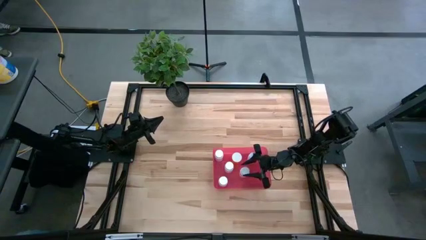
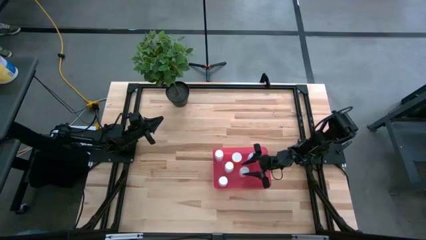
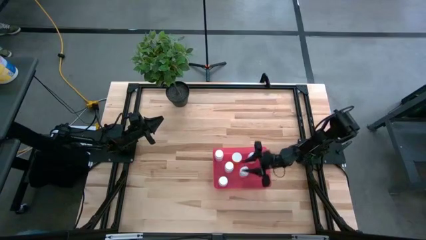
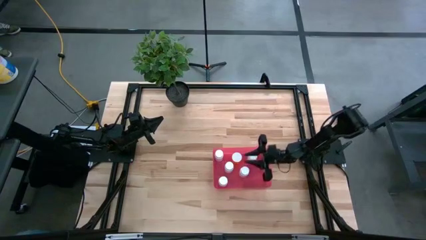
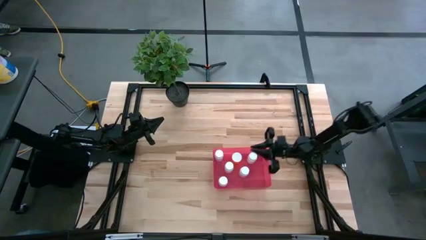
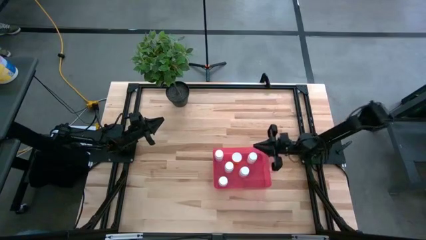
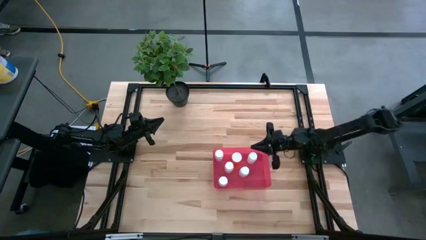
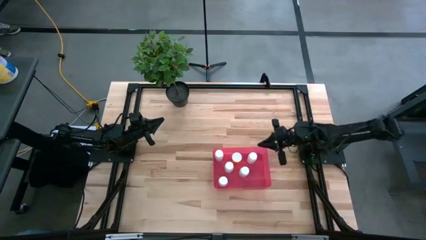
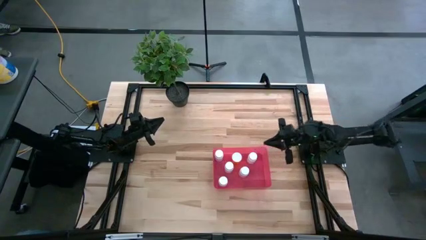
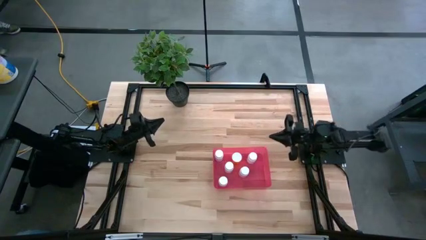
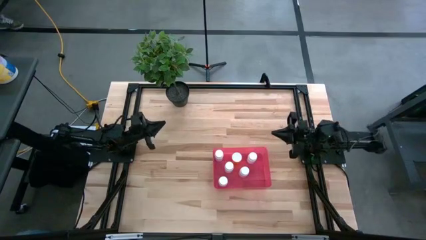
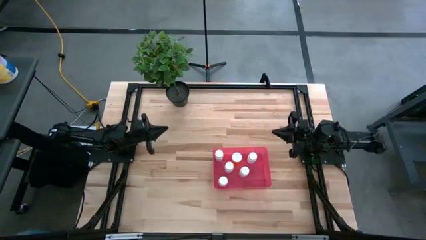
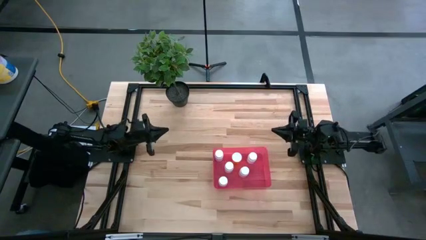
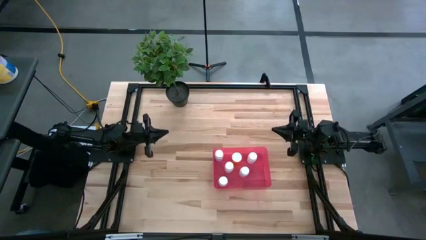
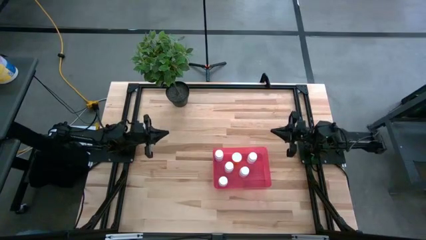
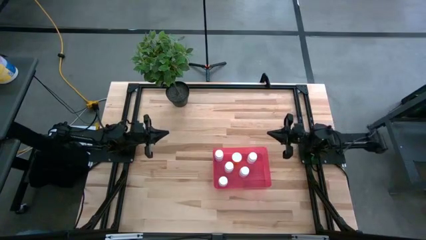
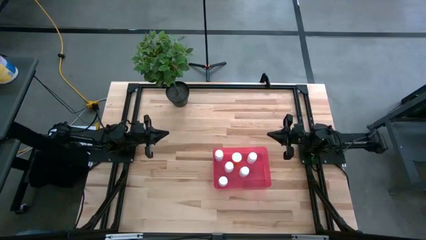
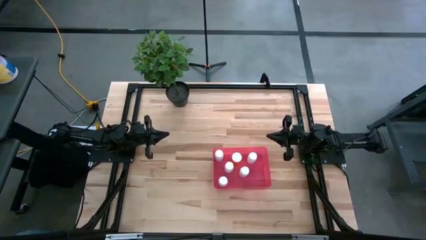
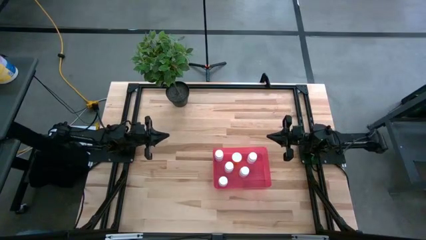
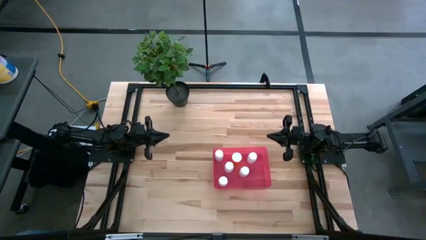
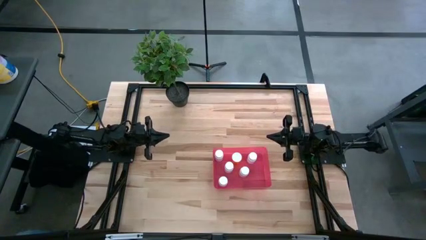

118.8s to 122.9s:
Task: Pick and place pill bottles into a basket
Return to Home Position

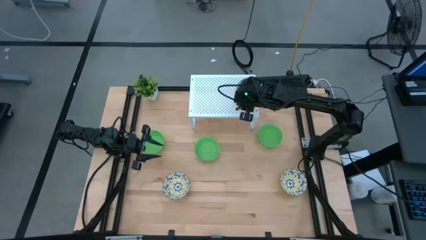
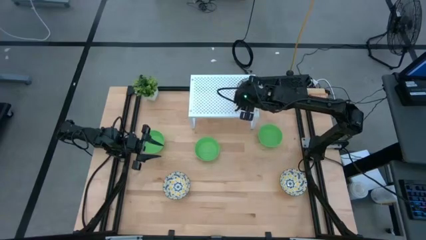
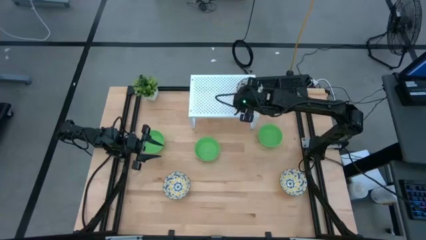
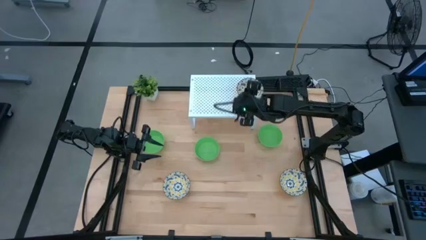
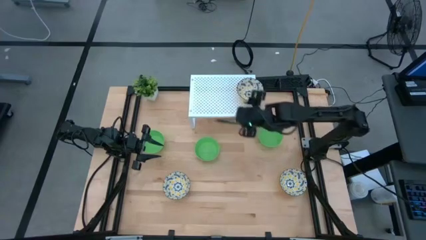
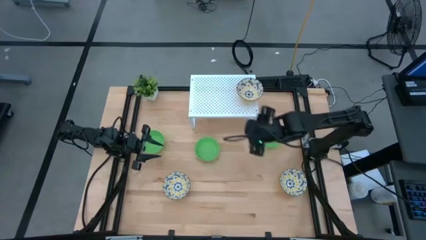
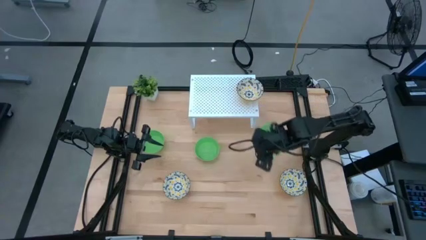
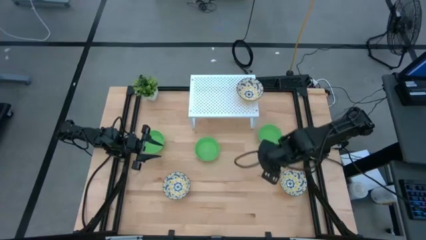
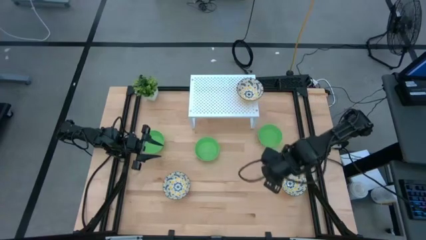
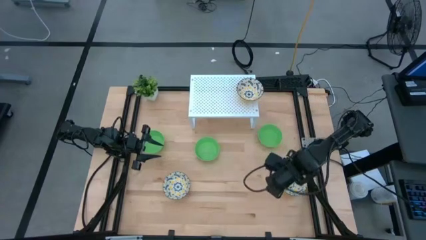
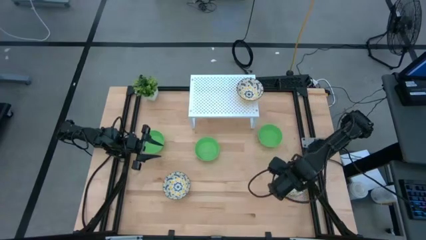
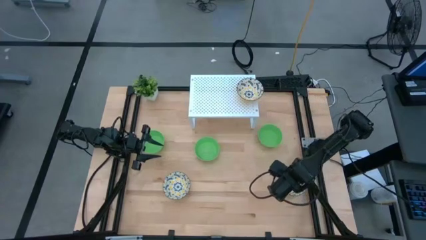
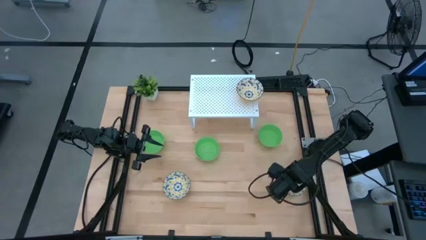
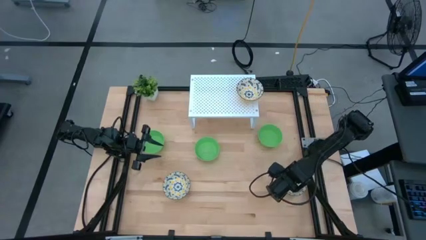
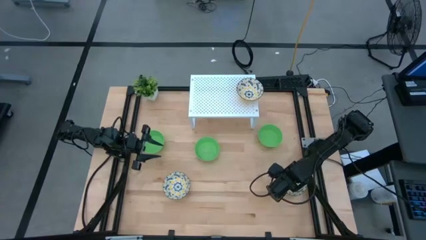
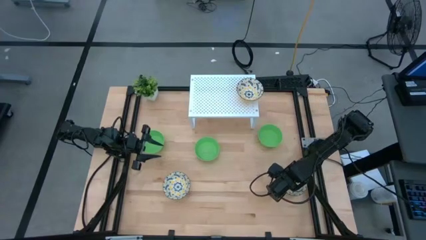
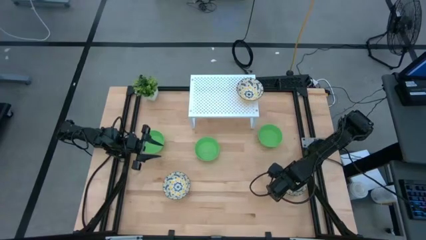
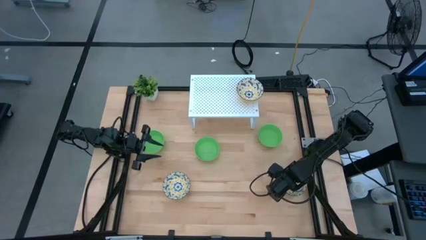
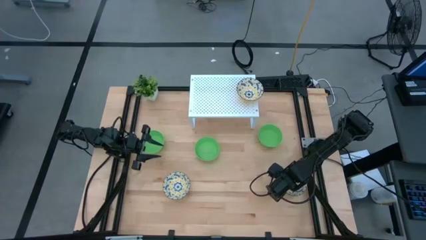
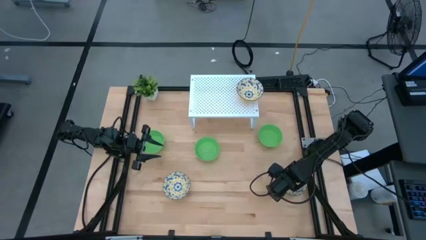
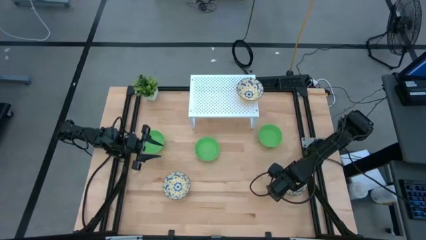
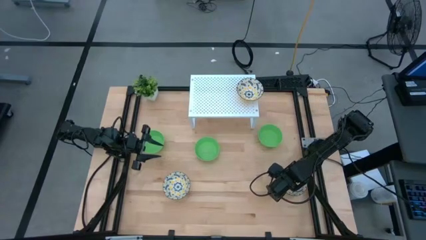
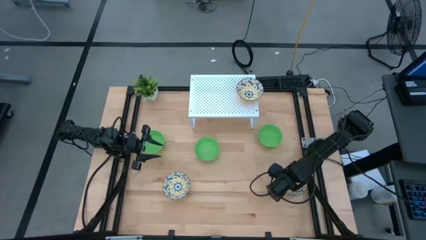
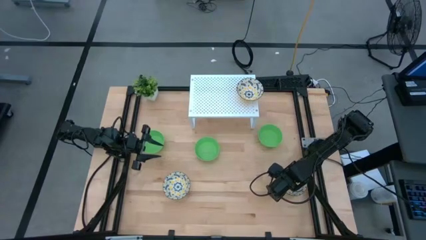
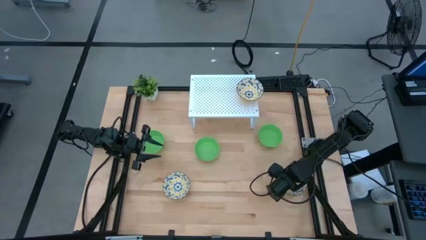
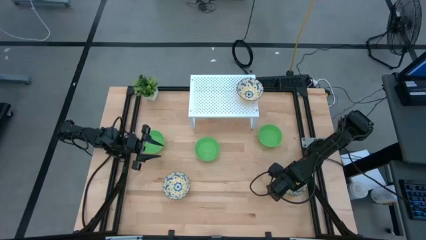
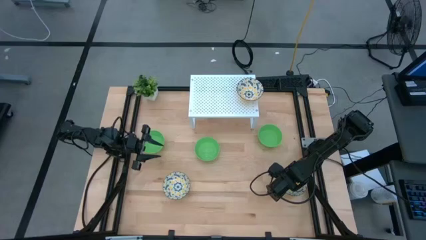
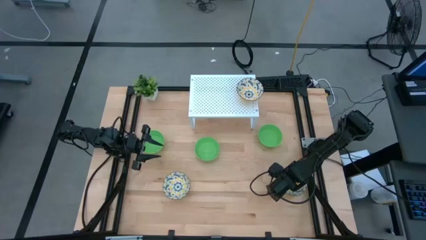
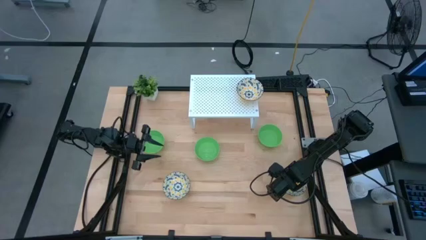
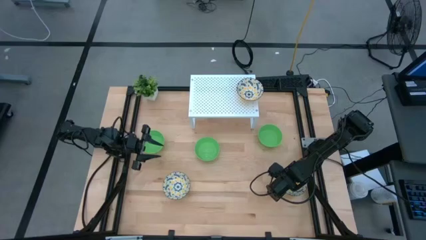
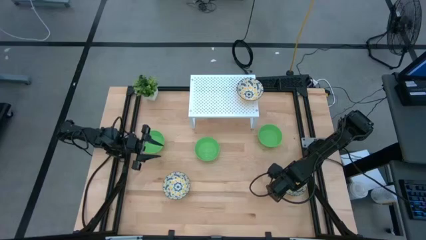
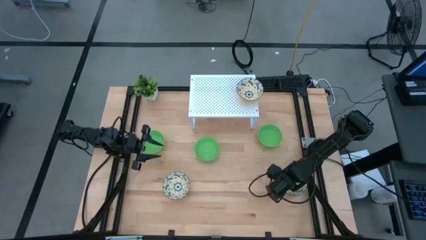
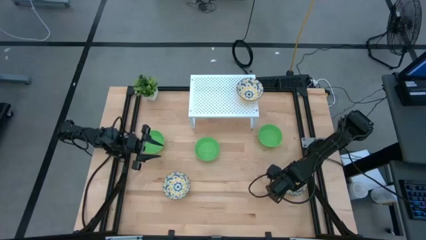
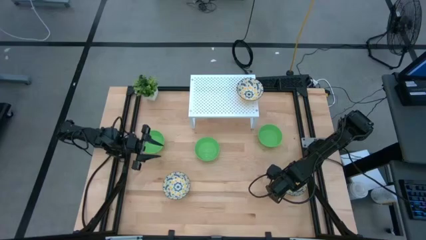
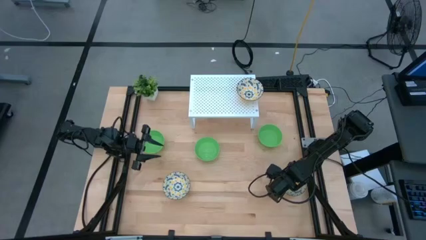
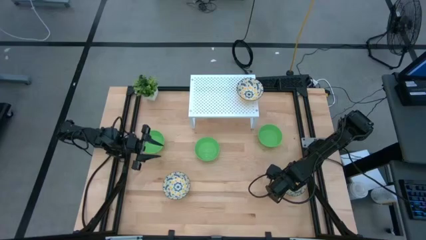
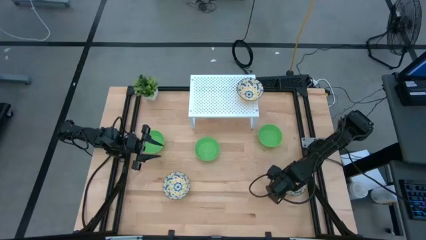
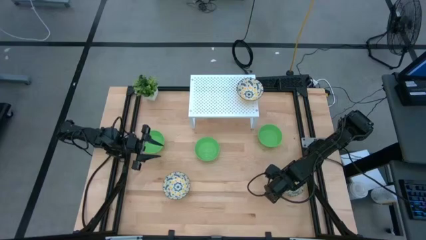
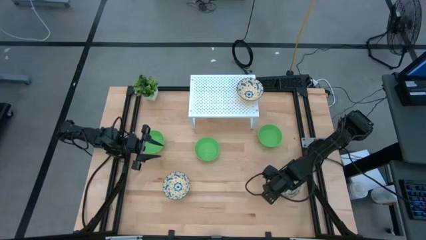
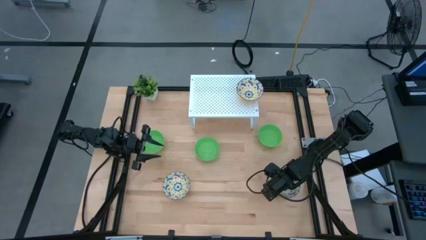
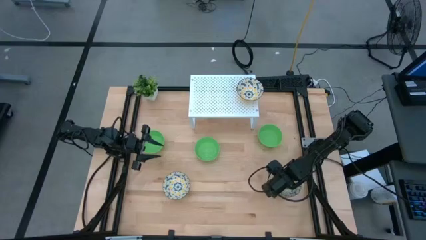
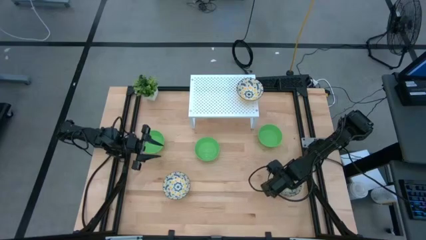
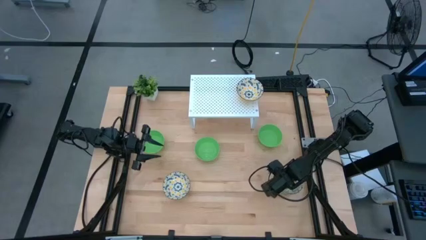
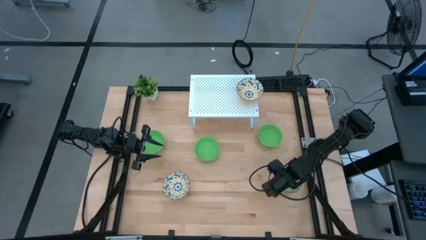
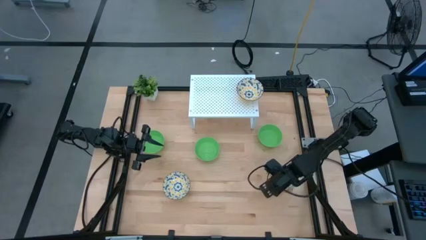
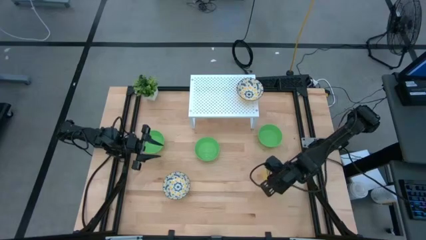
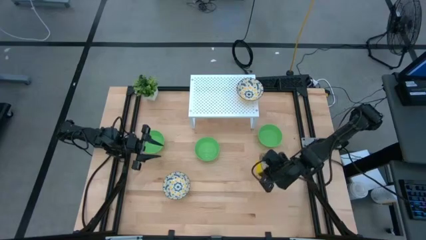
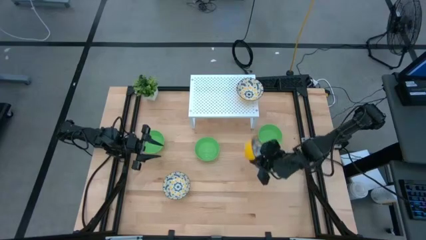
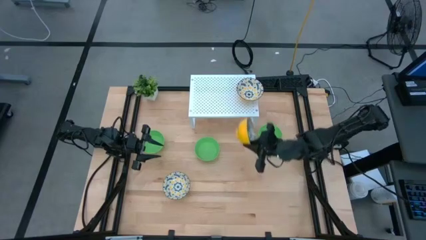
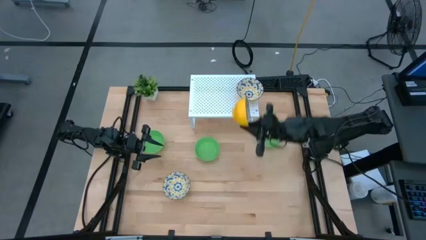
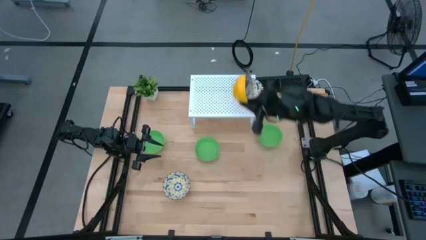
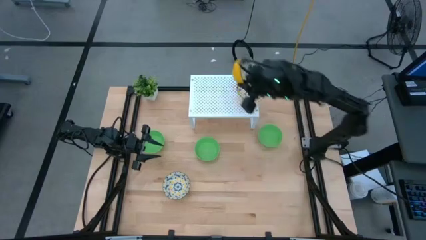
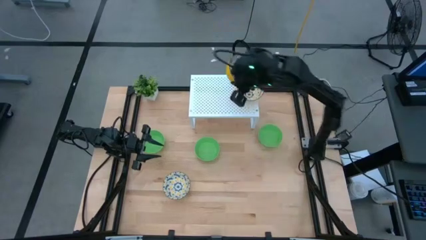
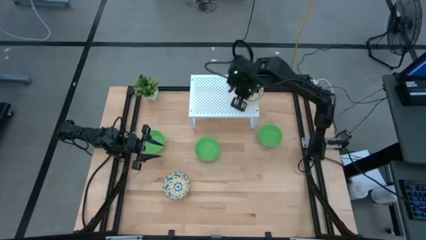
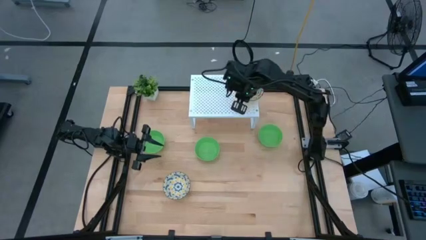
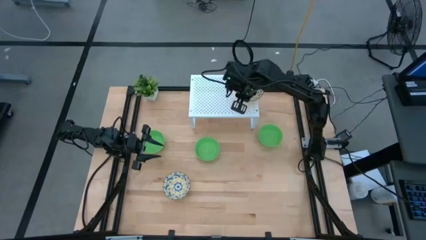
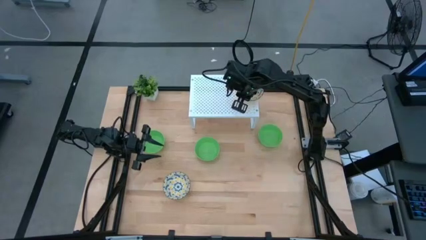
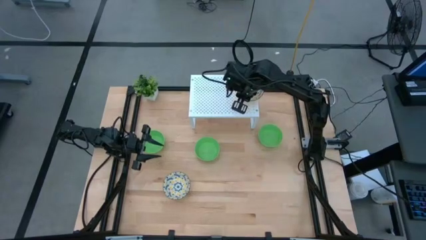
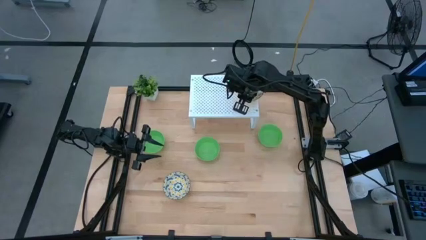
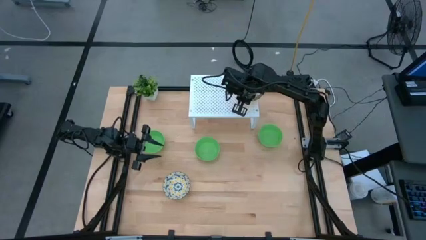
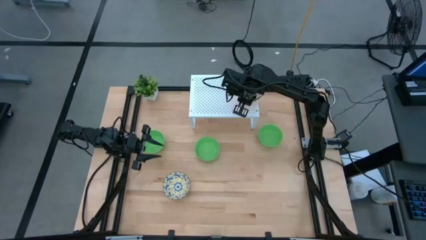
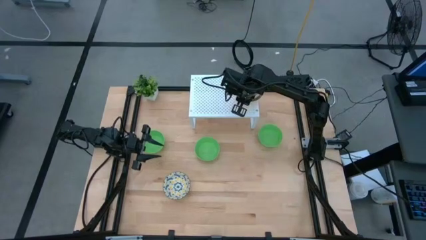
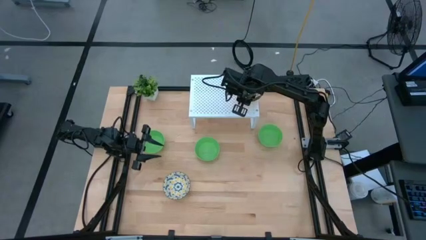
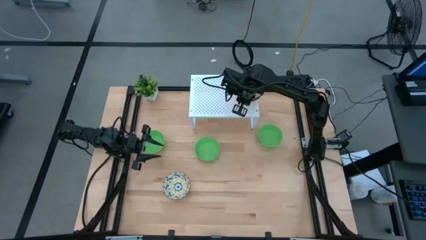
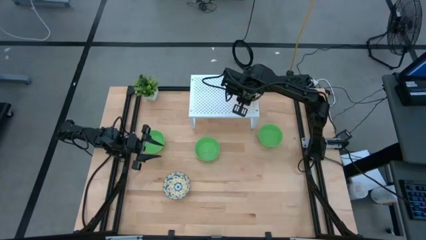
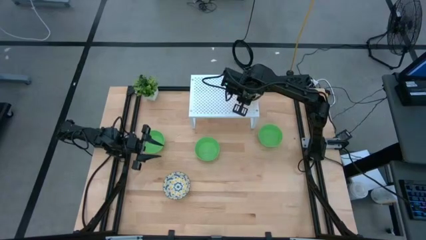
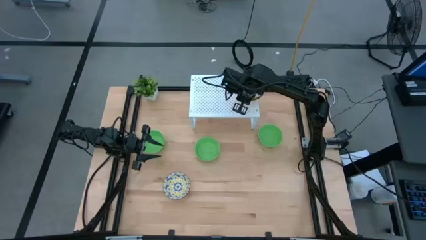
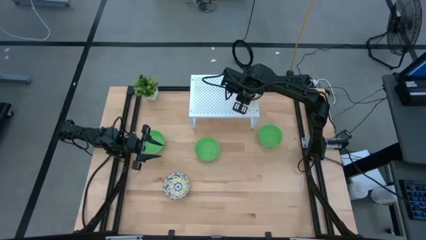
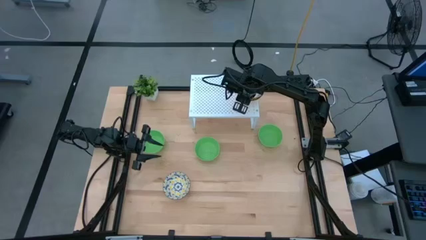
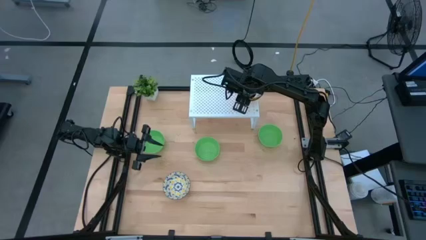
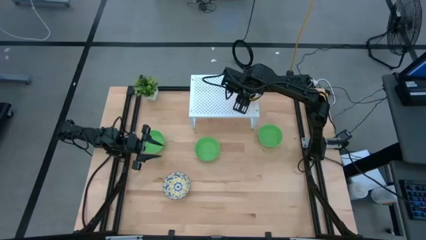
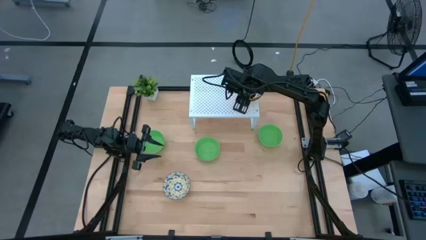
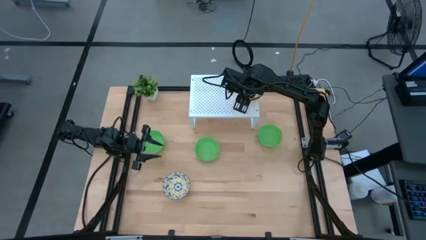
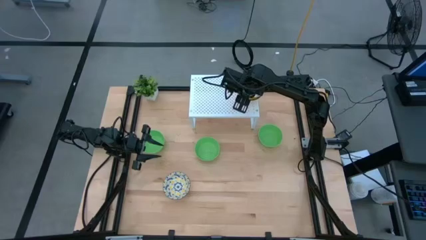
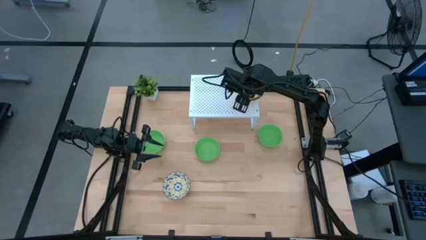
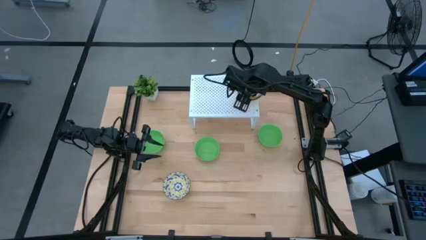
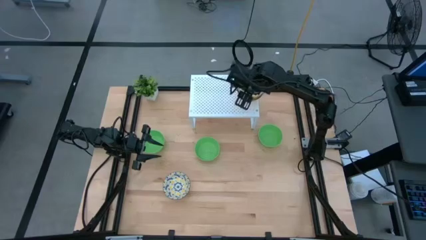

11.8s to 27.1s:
Task: Pick & Place Mini bowls
Stack the right blue and yellow patterned bowl on top of the blue and yellow patterned bowl on the shelf
